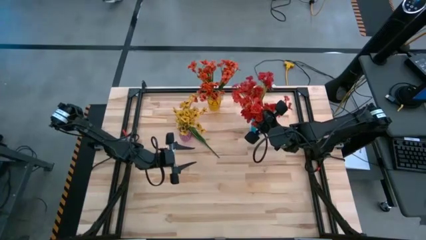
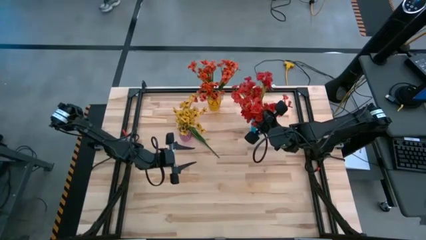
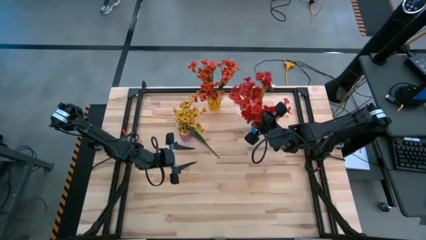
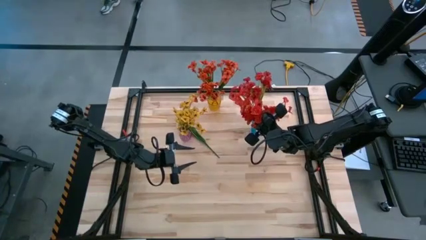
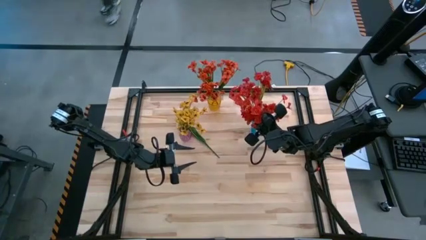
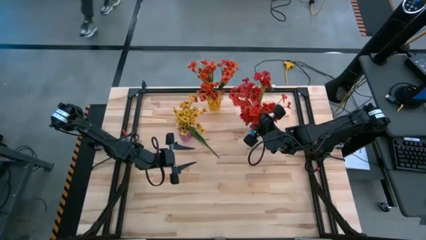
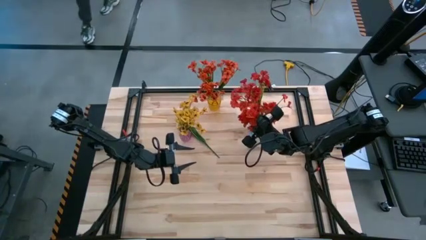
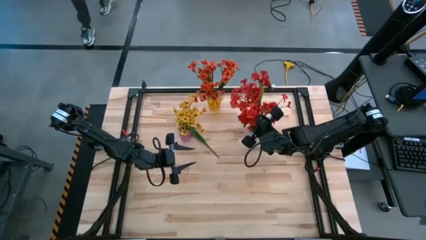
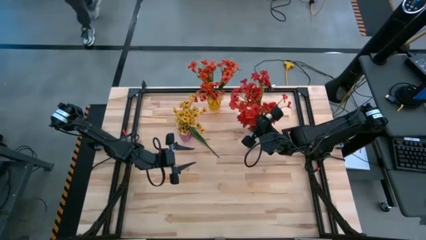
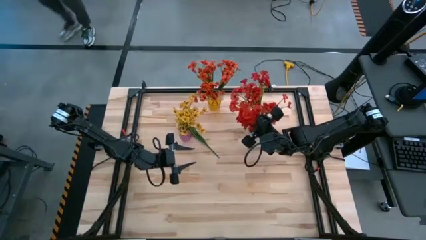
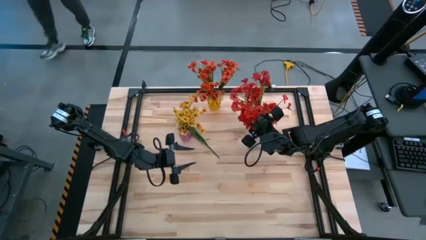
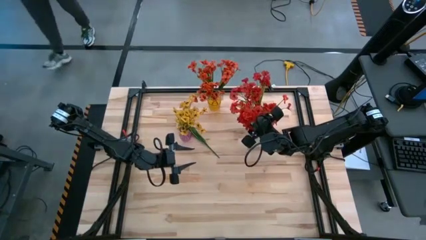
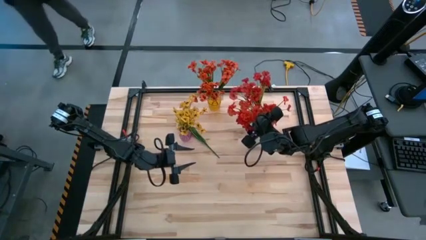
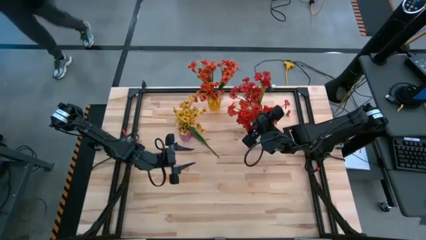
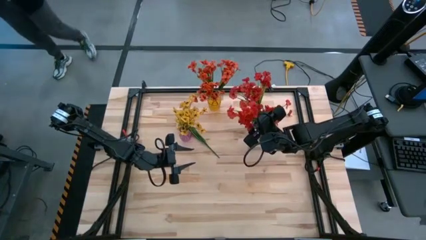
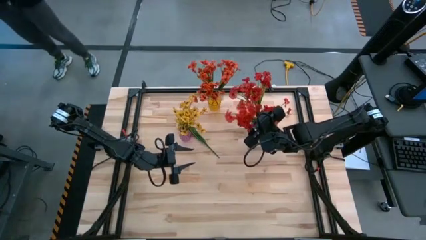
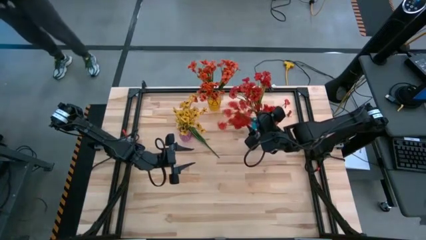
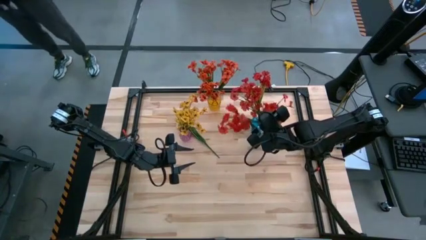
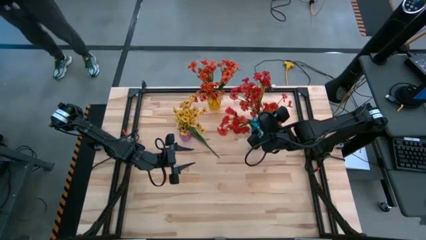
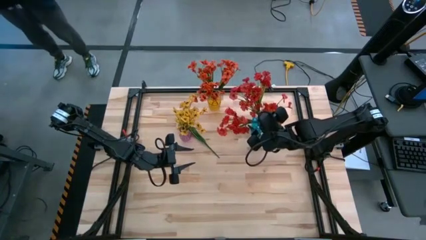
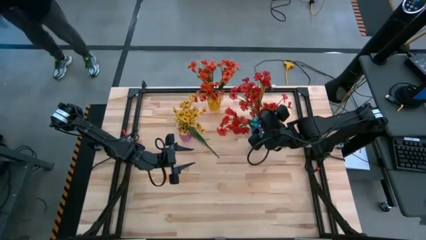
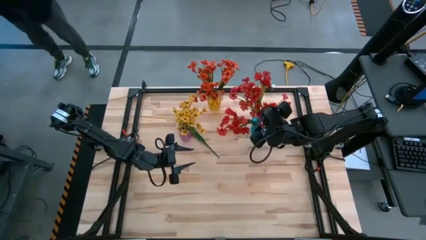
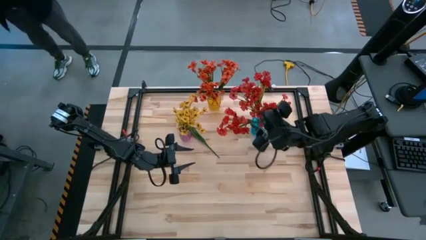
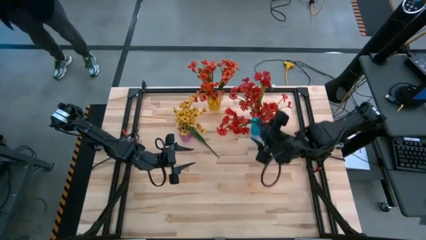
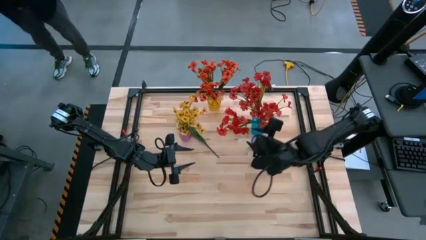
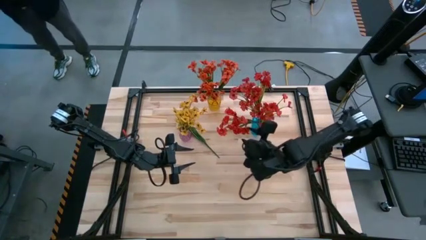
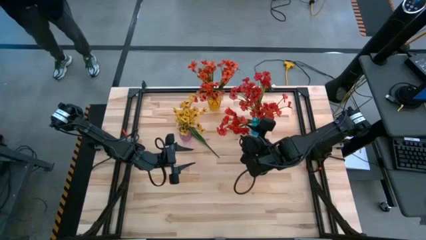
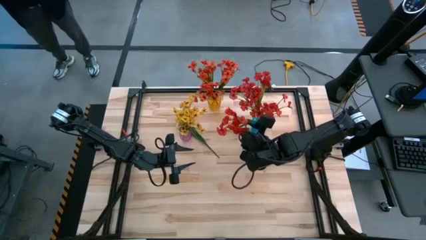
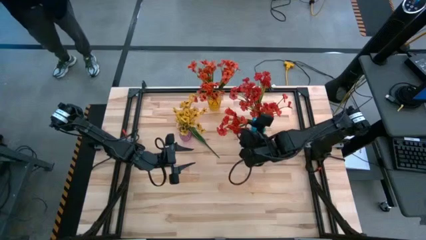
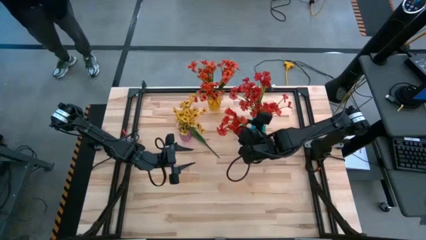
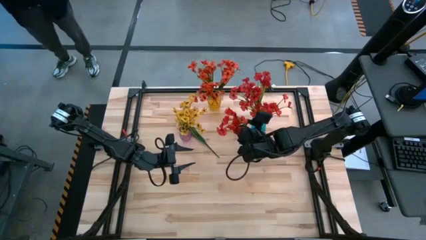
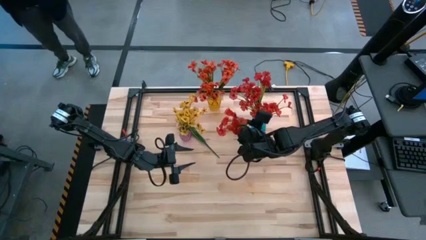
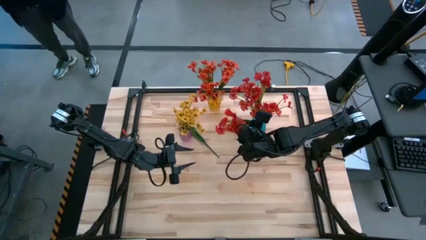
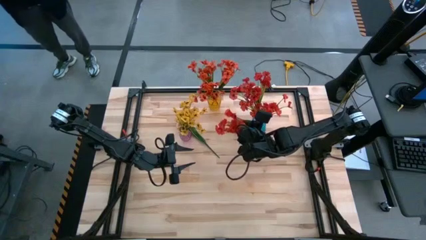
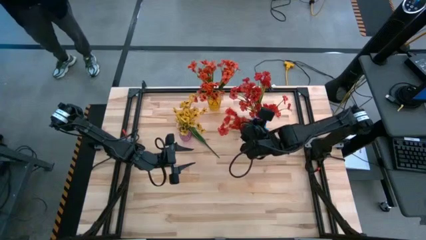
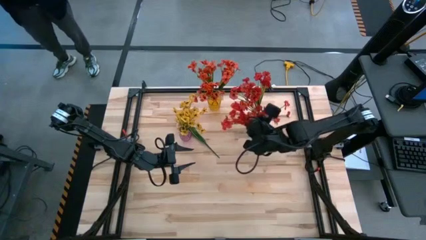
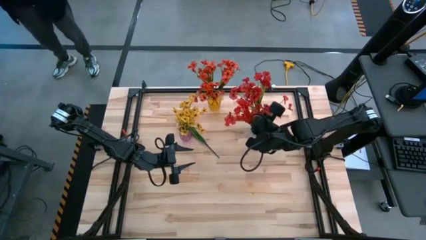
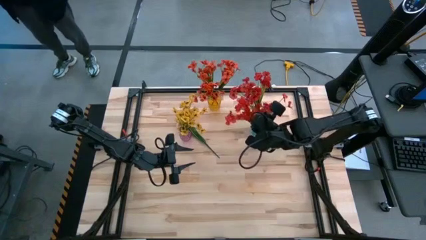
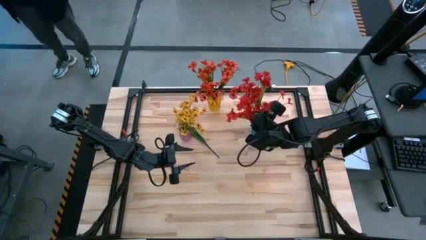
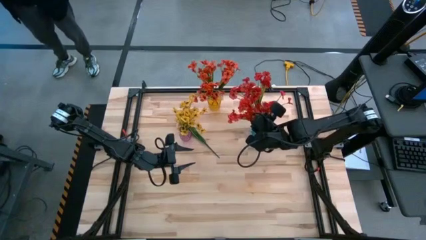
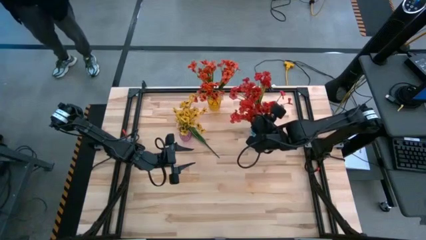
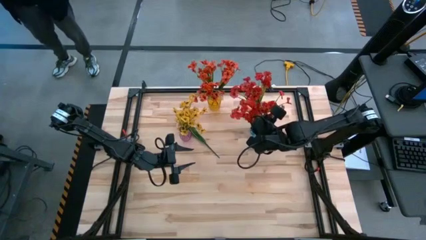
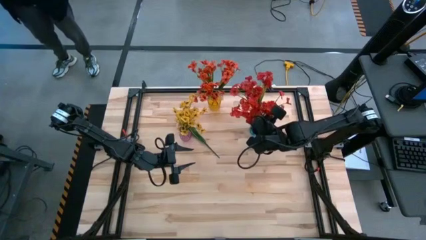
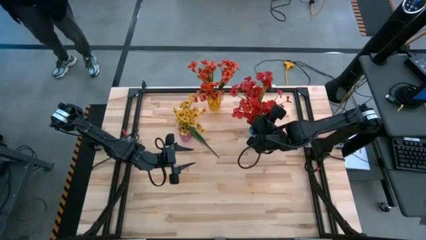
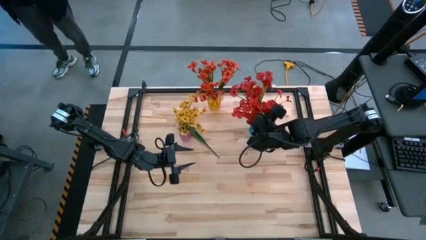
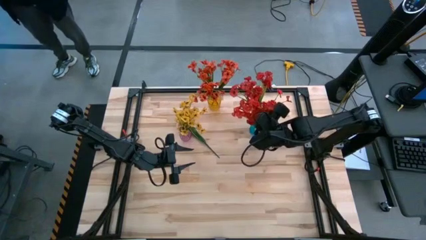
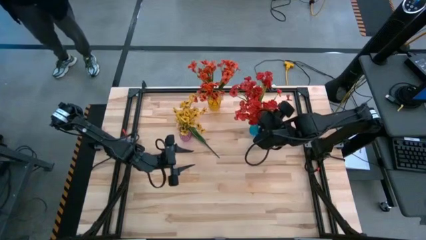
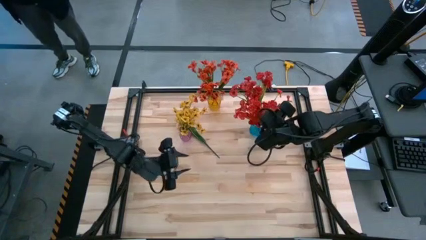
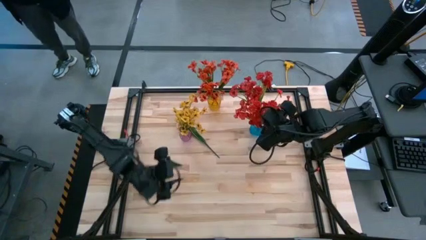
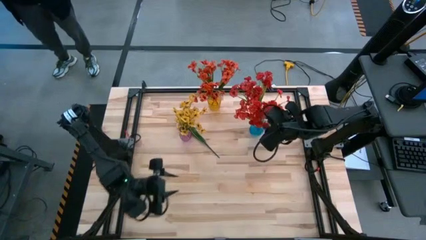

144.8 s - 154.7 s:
Task: Sort flowers into vase by color
Put the red flower into the blue vase

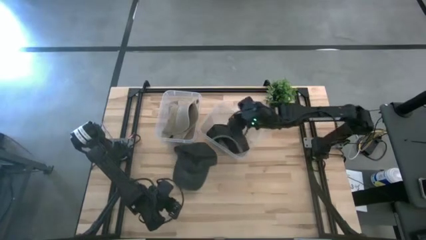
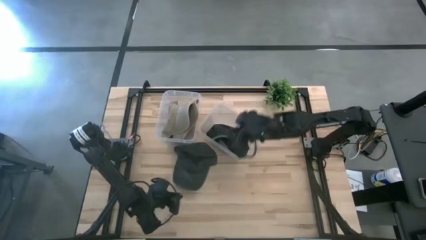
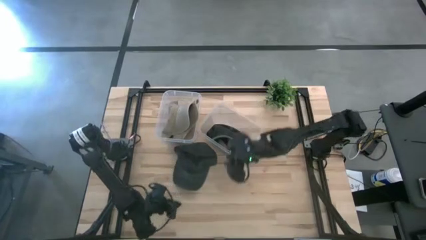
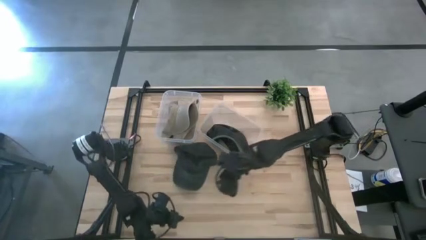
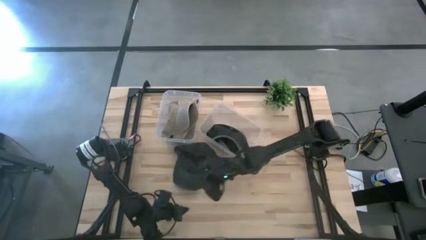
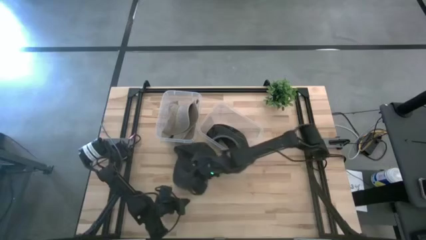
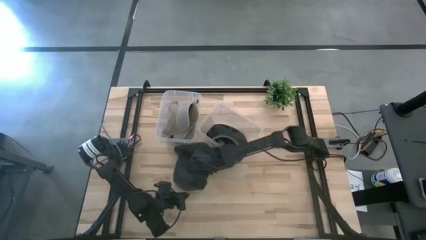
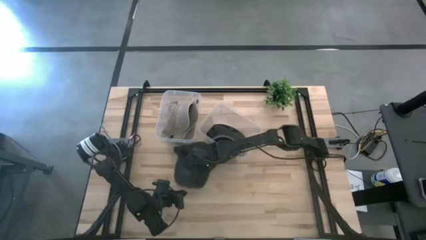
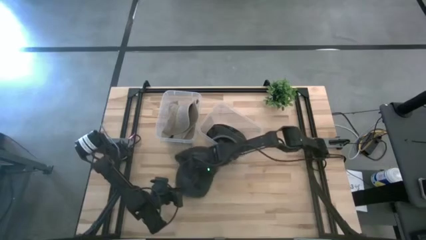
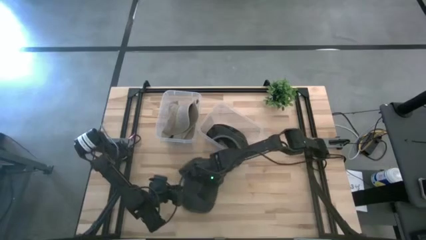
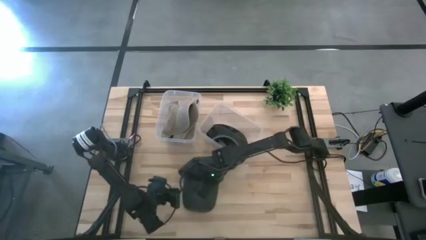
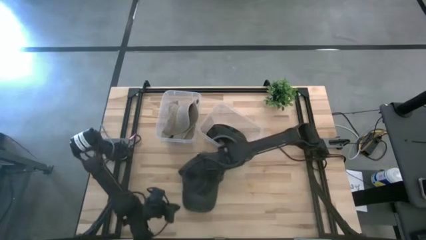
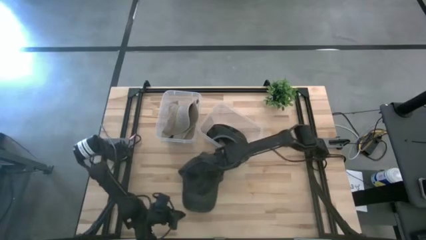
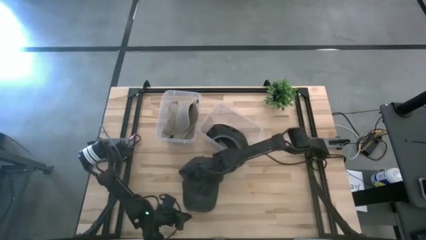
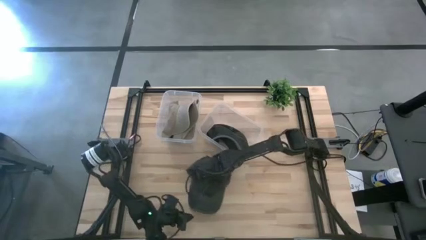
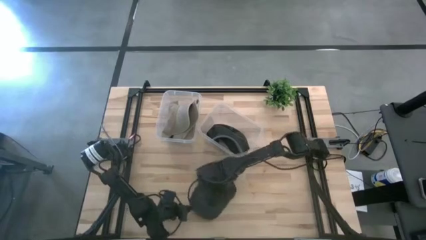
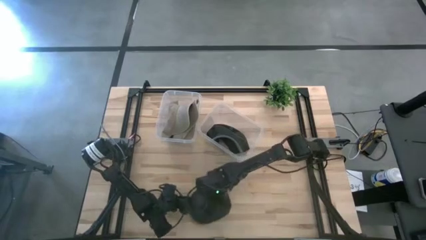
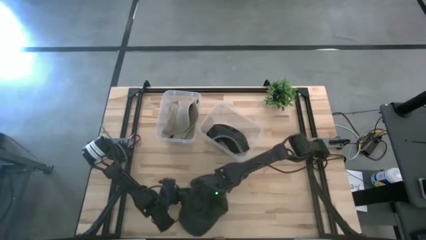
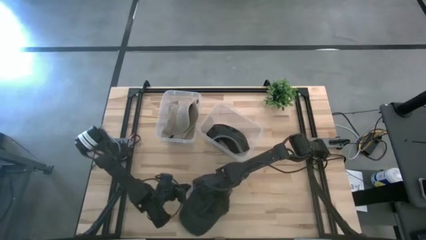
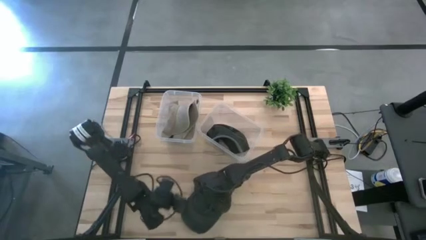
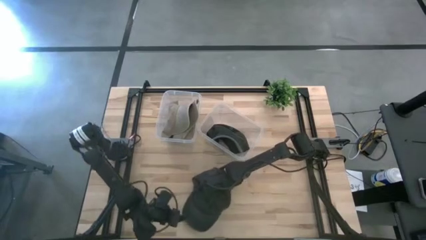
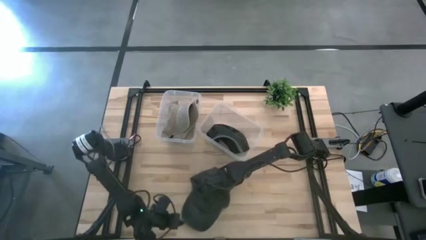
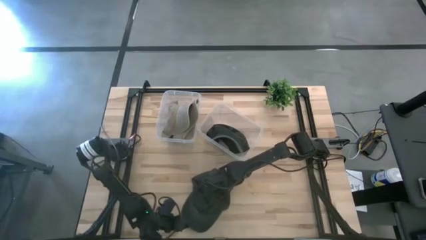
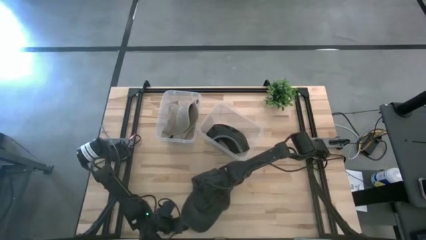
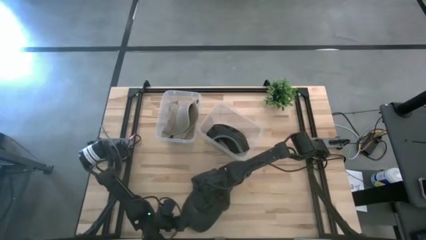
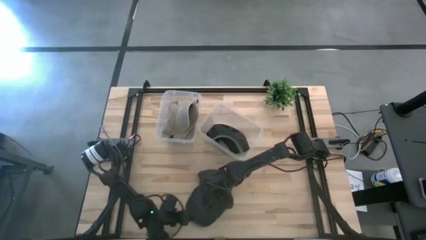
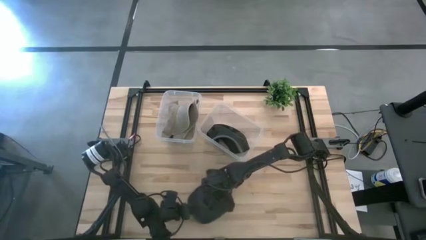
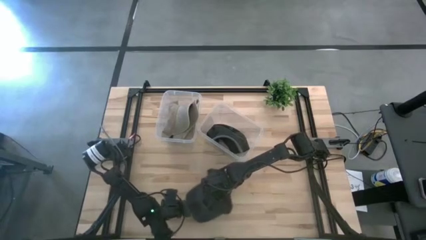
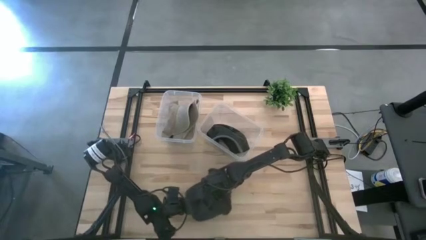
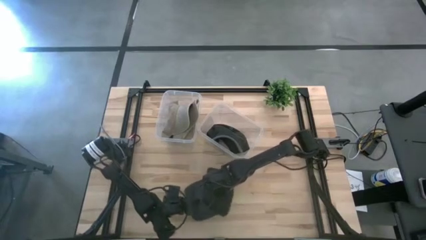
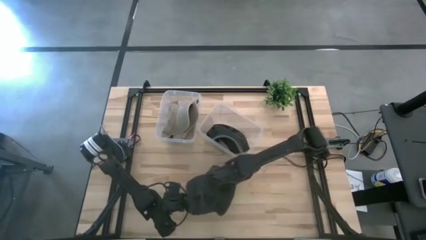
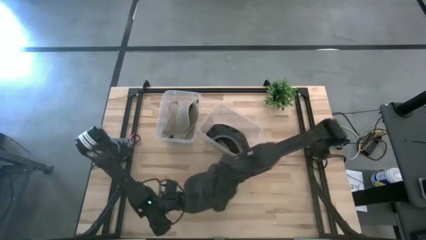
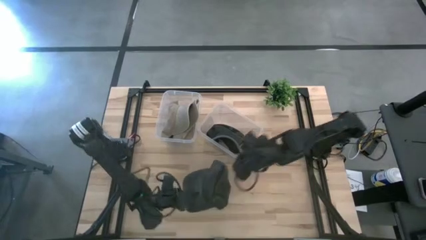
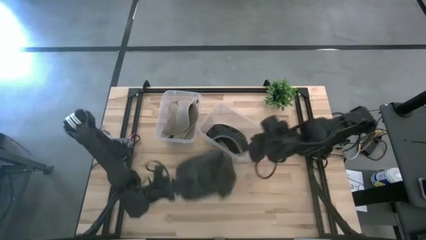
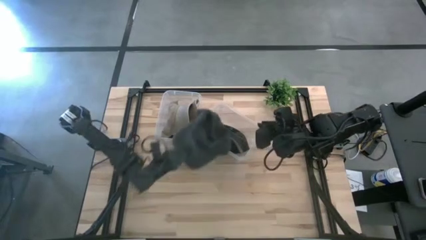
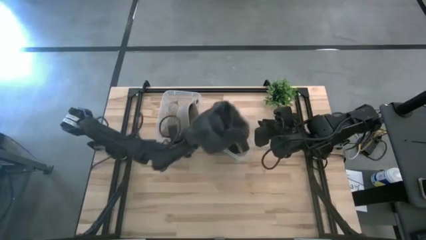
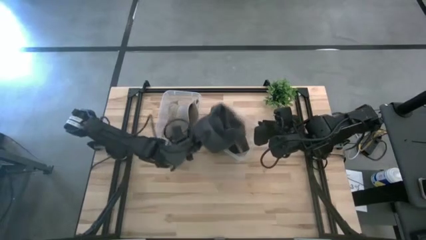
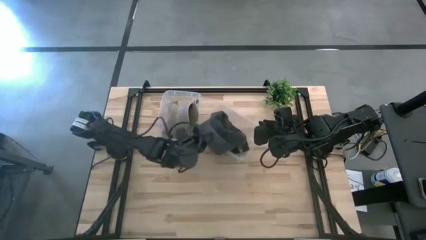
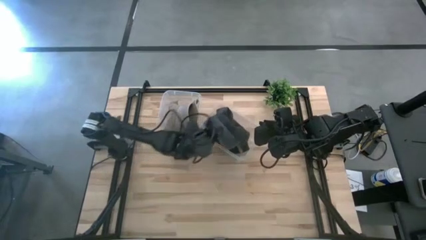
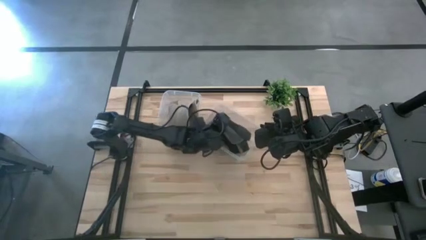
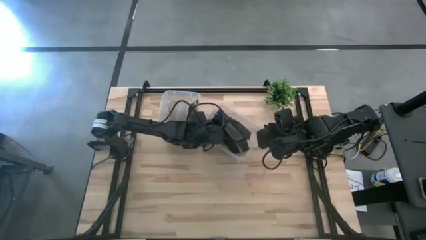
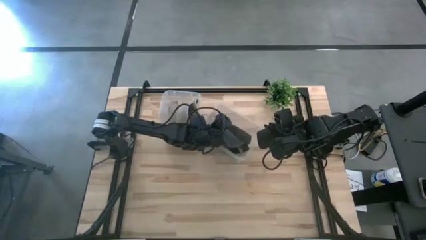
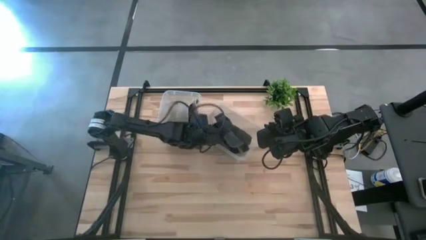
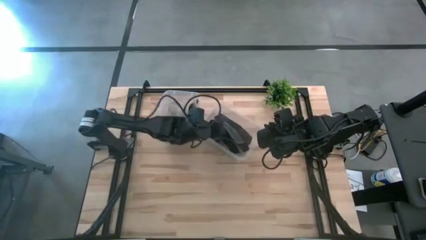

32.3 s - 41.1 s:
Task: Pick & Place hat
Put the black cap into the right transparent bin
